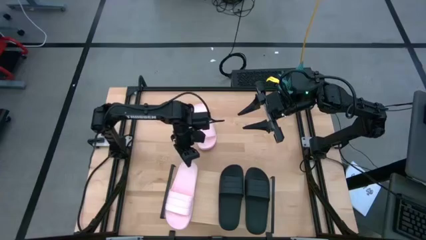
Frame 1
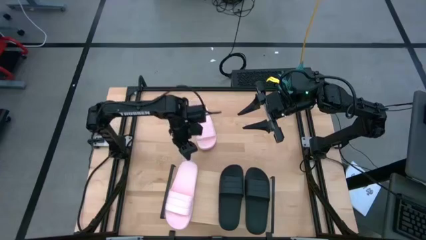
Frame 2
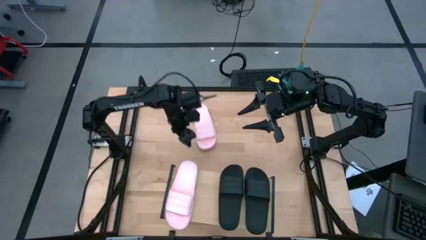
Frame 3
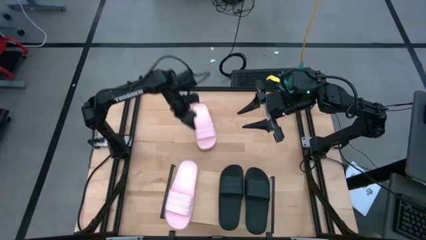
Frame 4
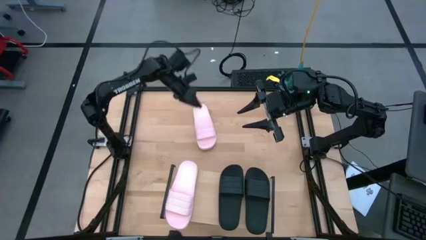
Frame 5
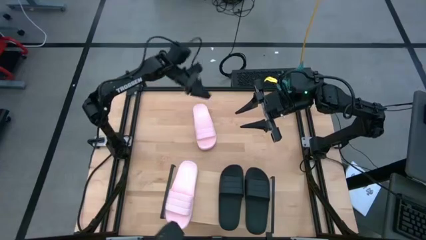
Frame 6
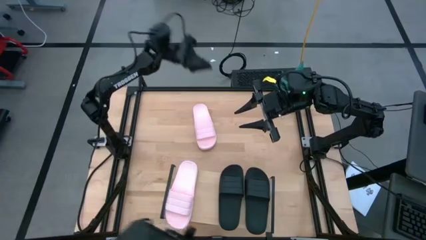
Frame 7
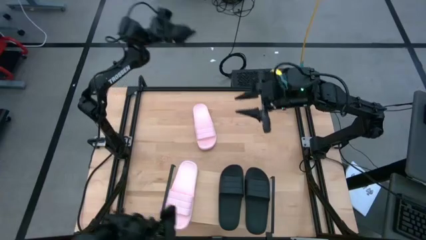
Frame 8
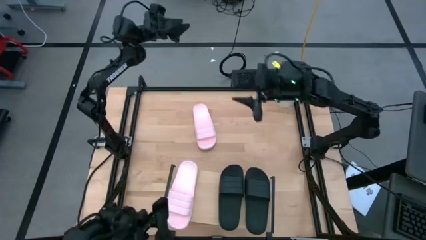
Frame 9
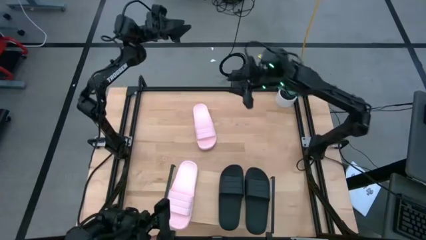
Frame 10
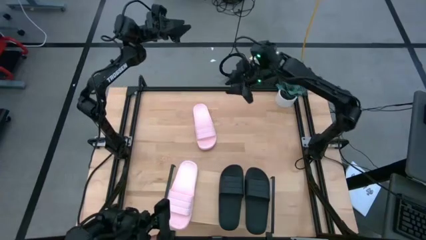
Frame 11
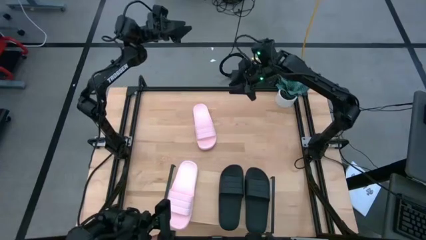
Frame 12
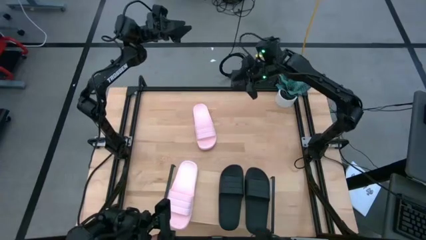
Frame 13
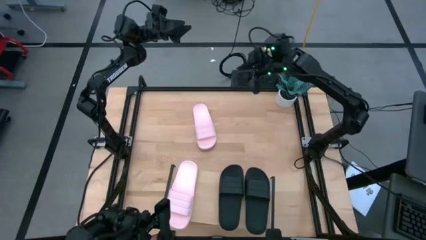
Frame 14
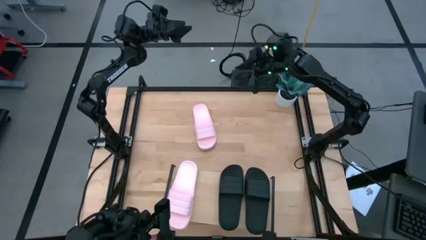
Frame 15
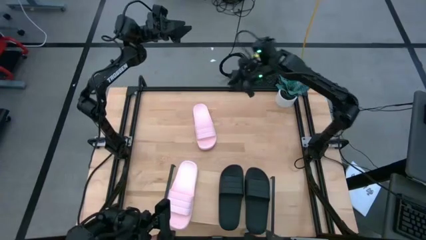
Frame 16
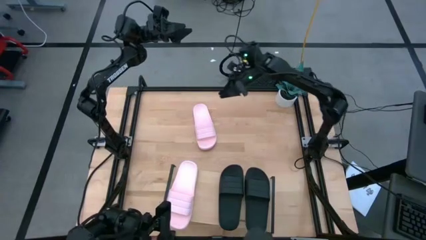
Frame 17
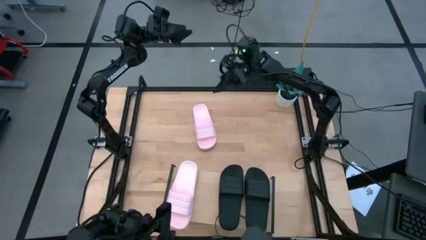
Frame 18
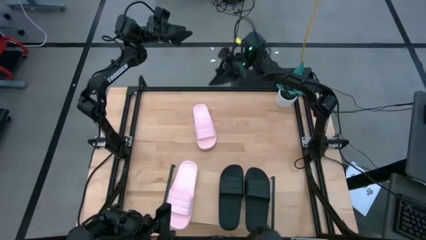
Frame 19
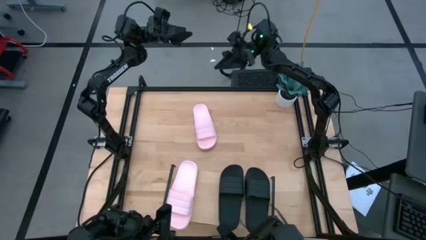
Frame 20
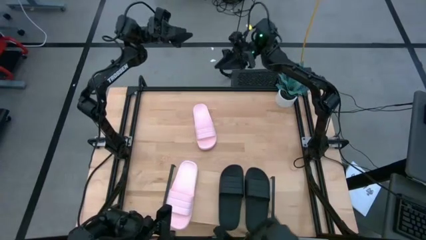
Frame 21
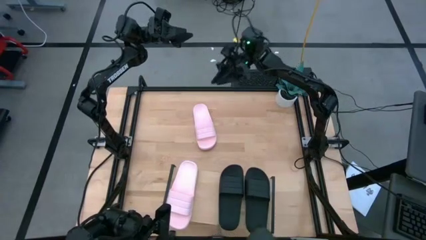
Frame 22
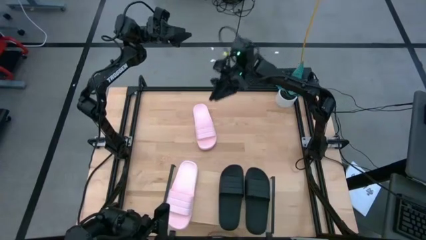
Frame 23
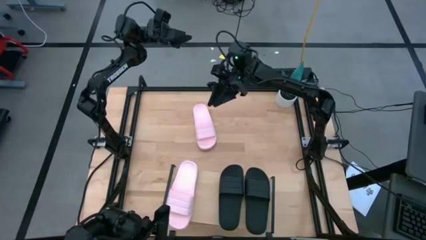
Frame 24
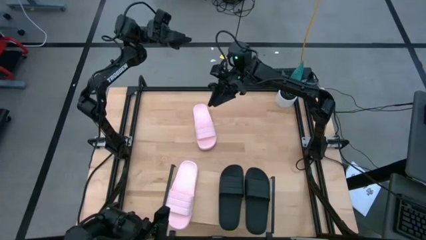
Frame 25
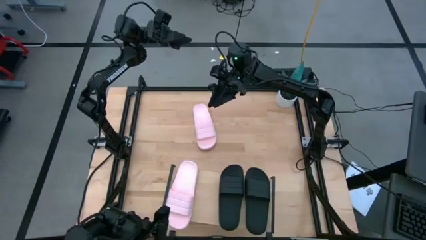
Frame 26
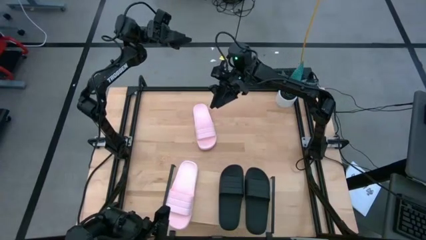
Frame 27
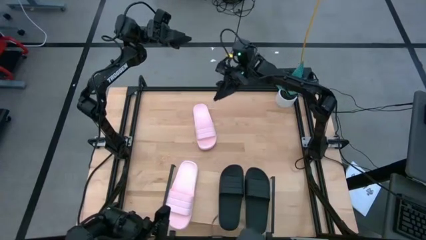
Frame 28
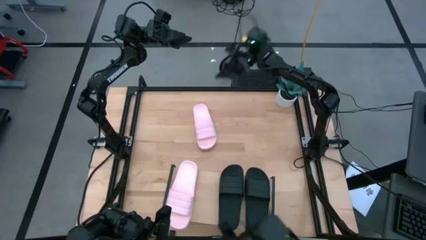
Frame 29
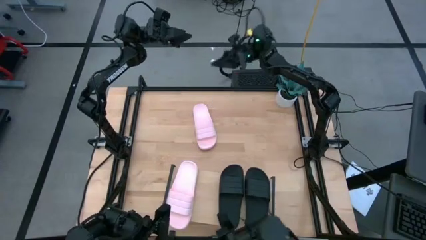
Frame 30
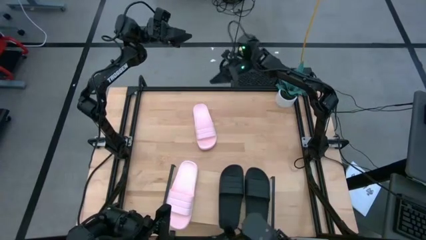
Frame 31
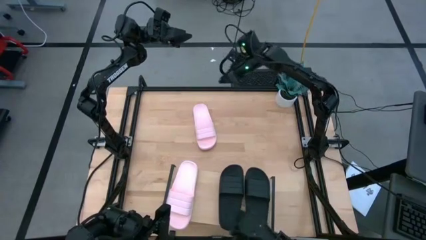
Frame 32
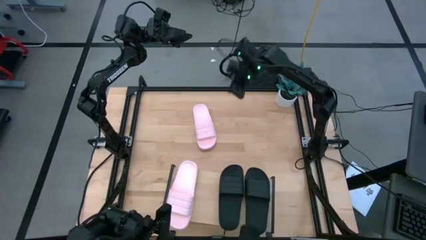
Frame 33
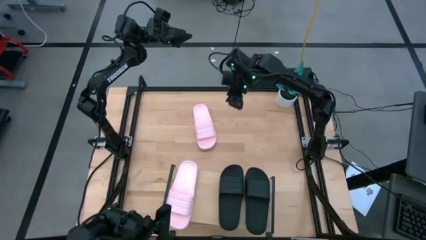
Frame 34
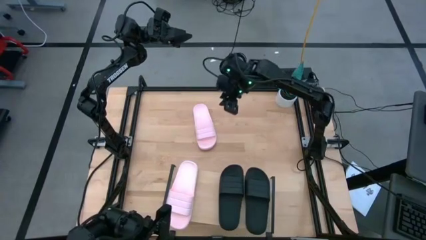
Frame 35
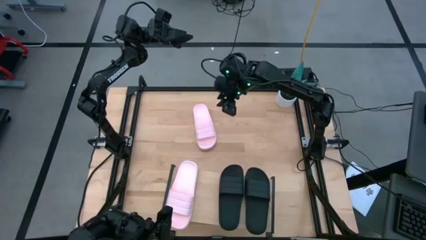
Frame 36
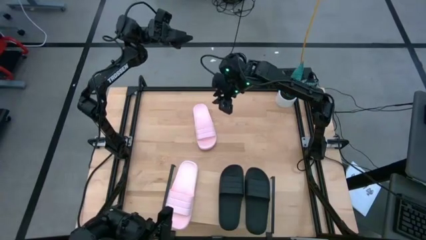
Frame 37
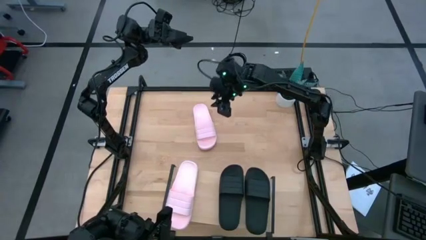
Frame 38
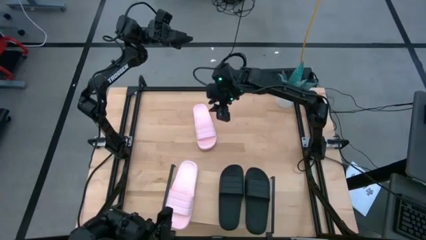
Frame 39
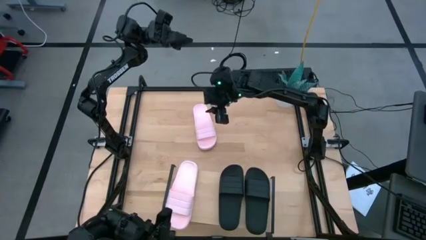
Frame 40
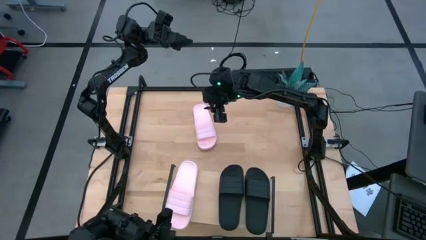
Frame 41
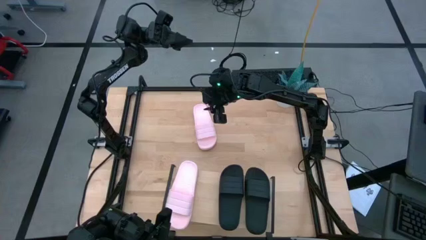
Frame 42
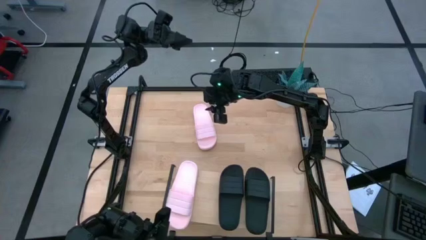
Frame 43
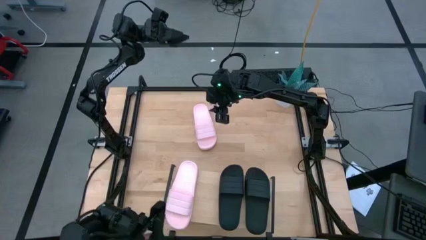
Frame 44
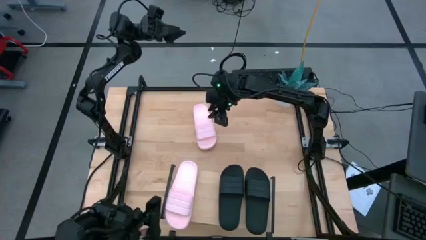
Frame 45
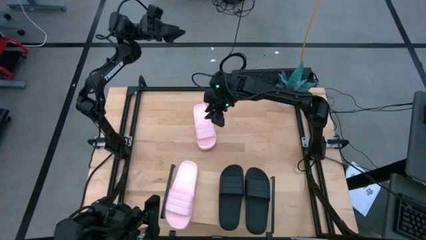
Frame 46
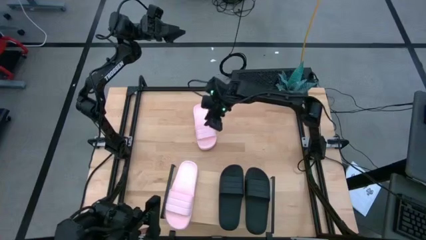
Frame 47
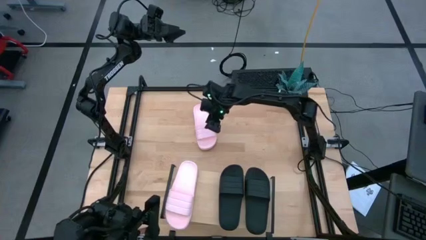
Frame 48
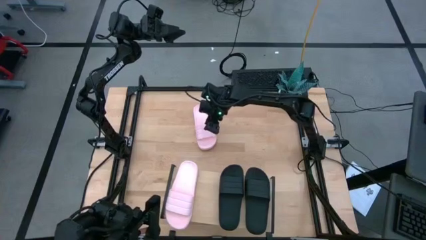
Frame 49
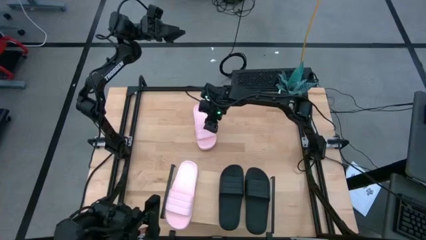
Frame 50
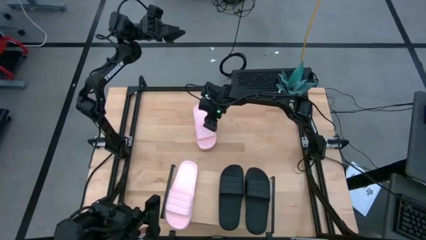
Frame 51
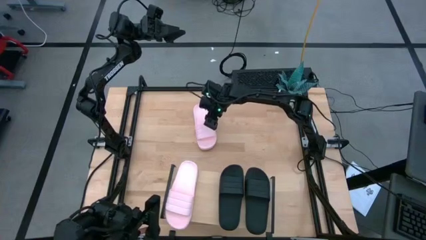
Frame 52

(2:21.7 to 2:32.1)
Task: Pick and place slides into the shelf
Put the pink slipper on the shelf
